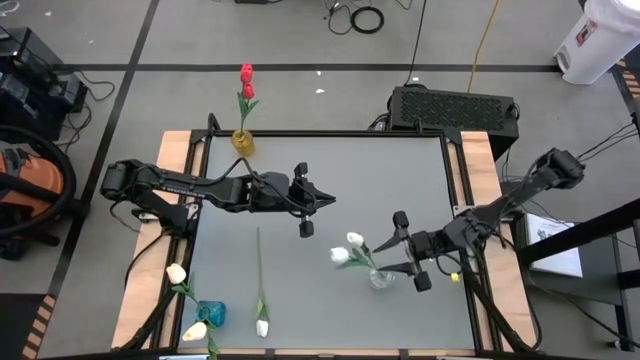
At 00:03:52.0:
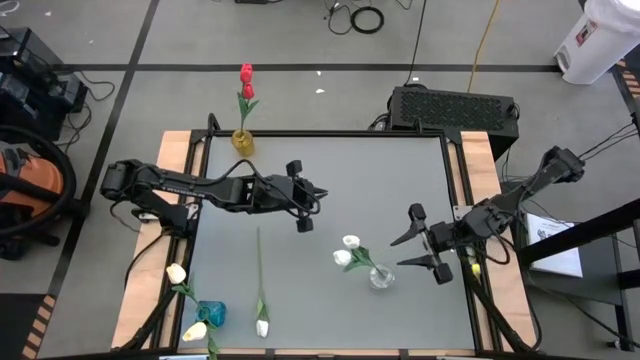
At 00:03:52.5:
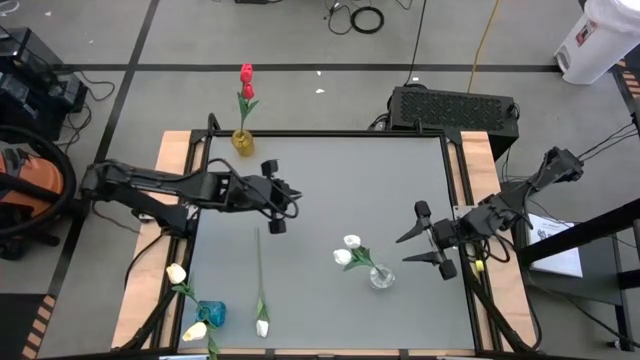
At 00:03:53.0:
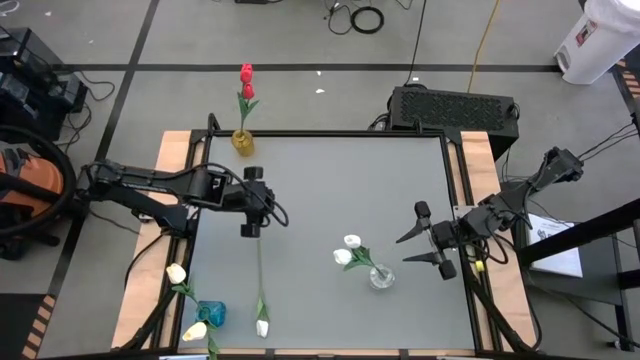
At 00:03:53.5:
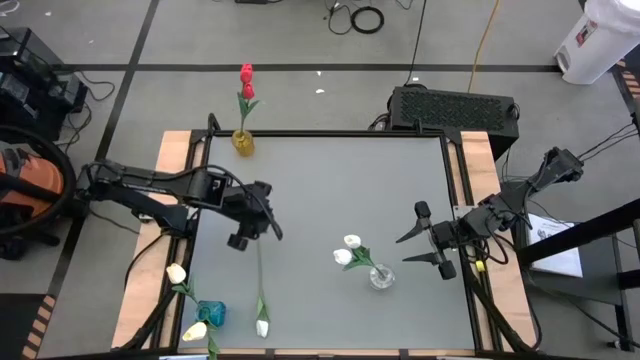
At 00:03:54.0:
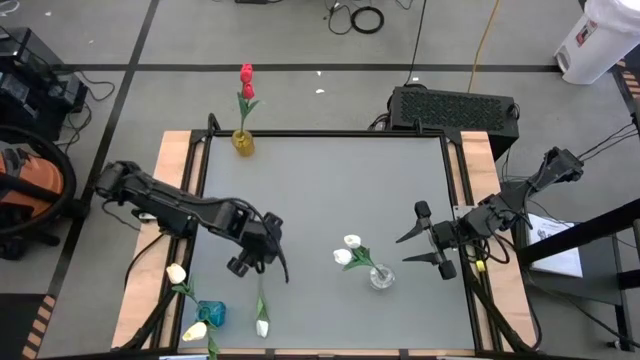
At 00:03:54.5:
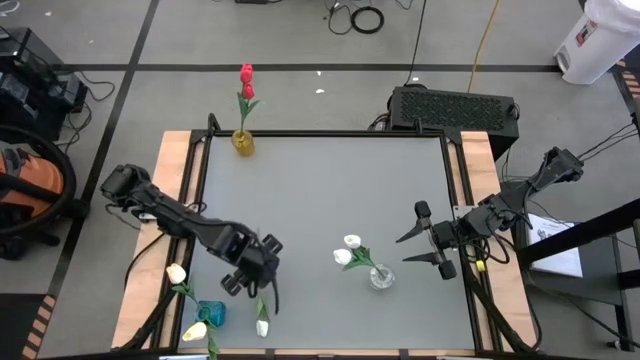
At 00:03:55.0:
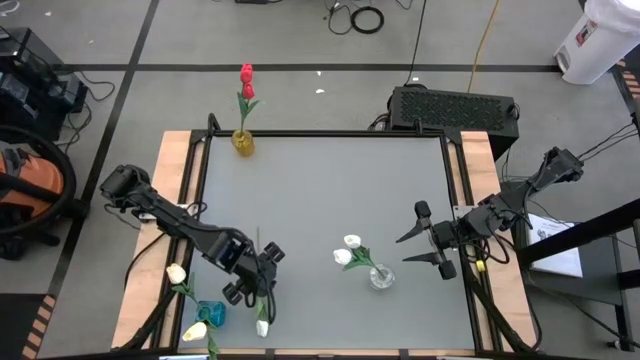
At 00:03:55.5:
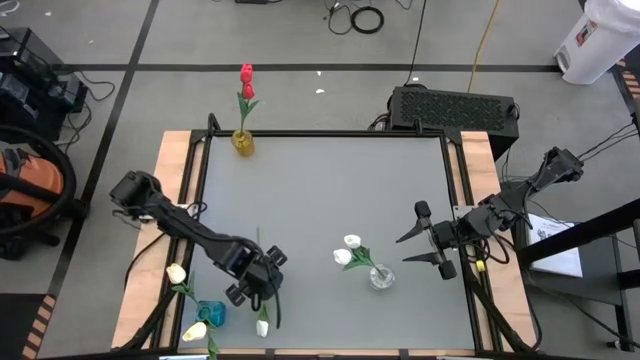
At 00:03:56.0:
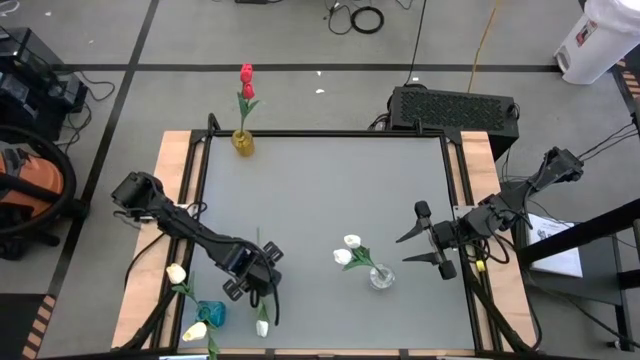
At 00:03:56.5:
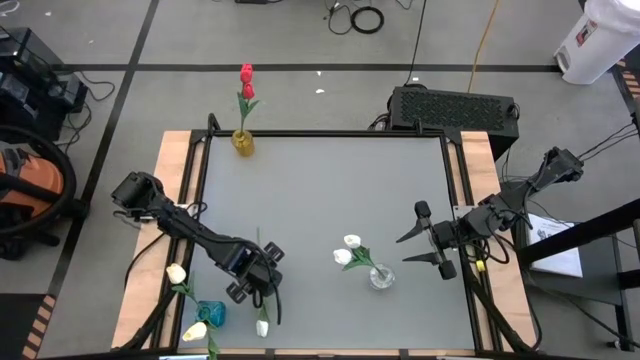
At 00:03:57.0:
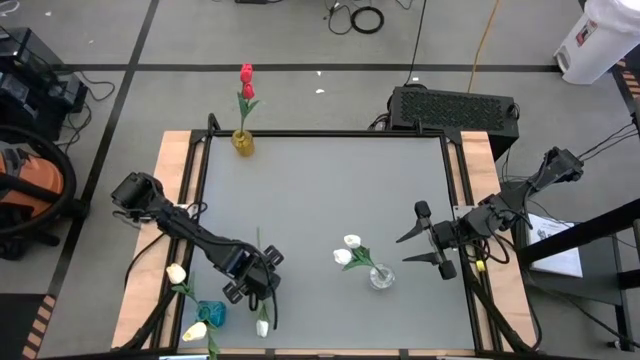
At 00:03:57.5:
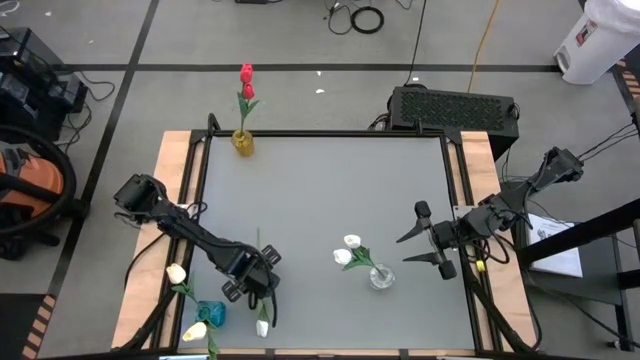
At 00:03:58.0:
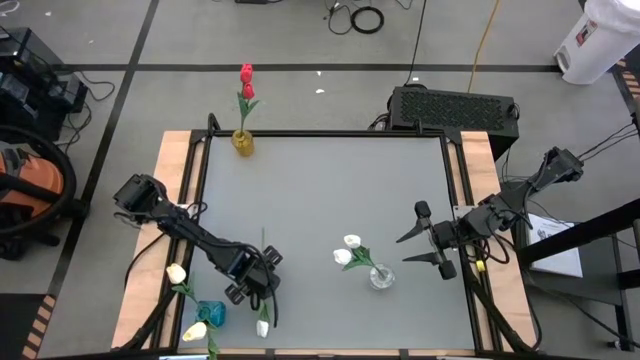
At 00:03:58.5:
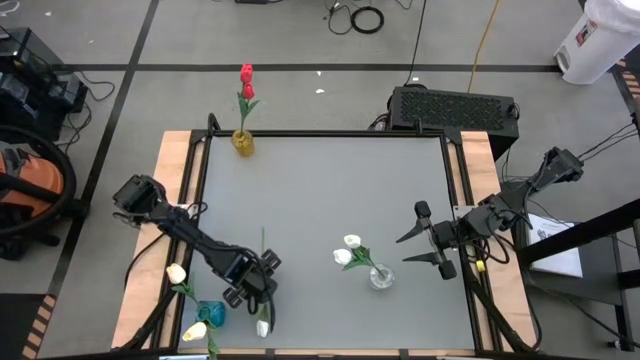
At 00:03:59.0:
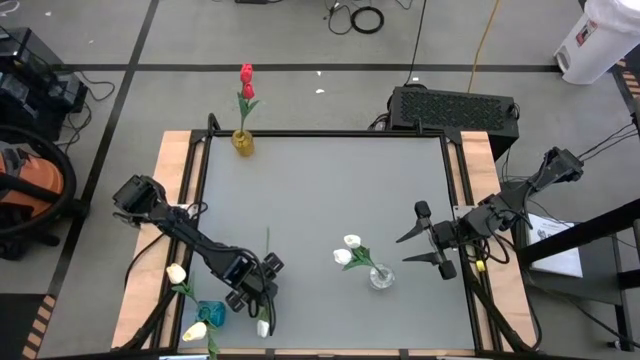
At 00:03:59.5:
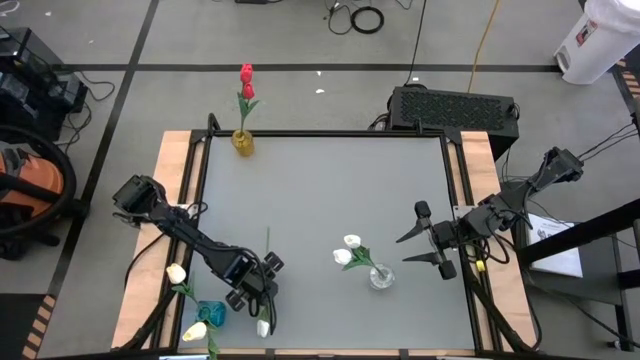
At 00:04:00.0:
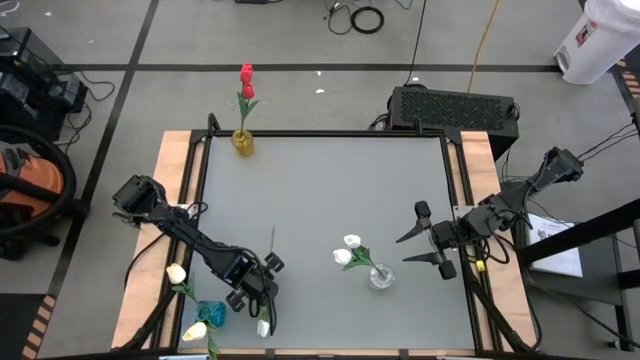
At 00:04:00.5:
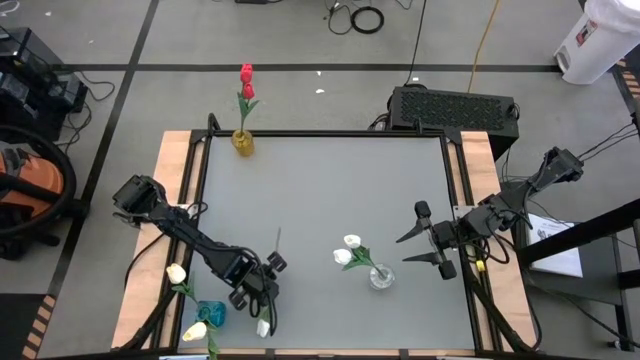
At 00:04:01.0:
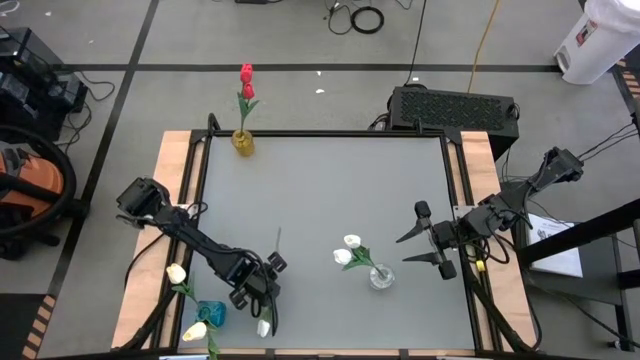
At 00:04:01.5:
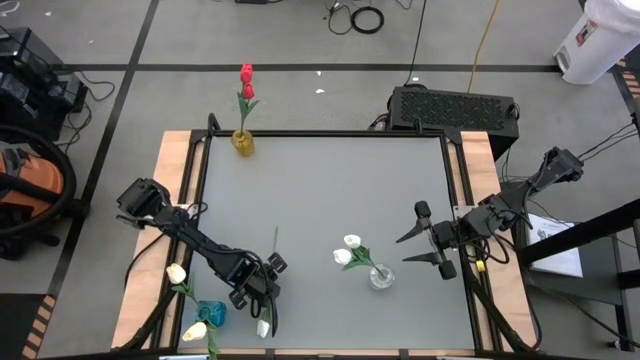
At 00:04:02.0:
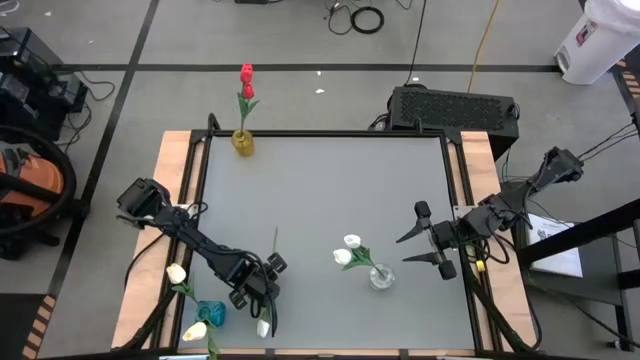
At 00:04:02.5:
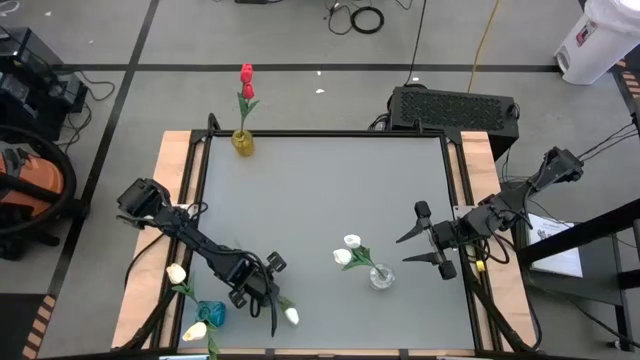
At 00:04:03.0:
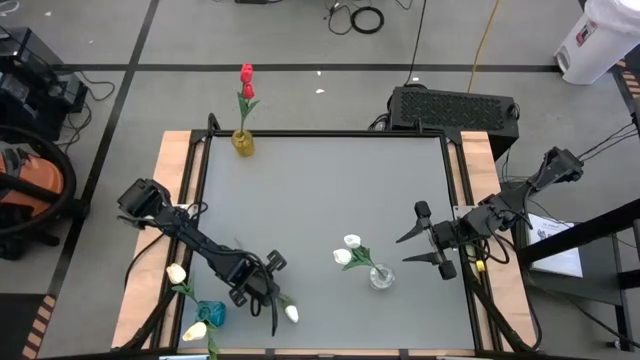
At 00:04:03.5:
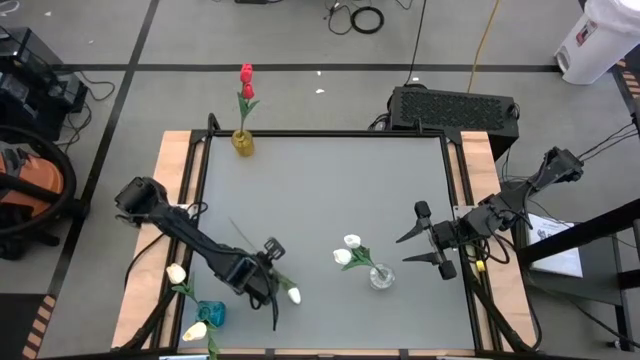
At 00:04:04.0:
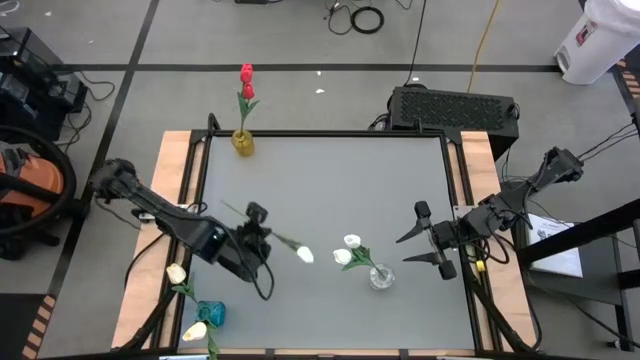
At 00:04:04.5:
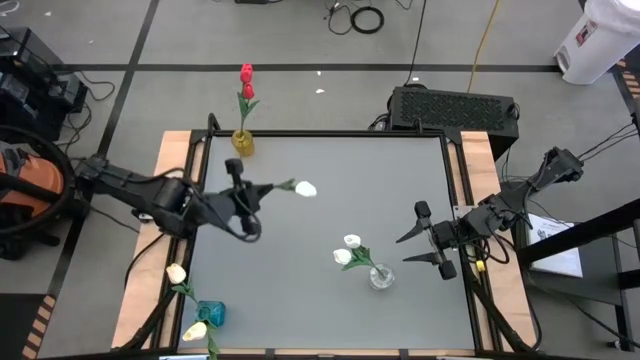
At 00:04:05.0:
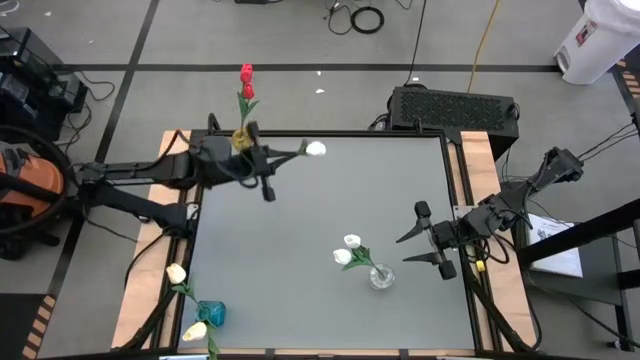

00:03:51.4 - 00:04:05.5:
Task: Sort flowers into vase by color
Put the white tulip into the transparent vase
